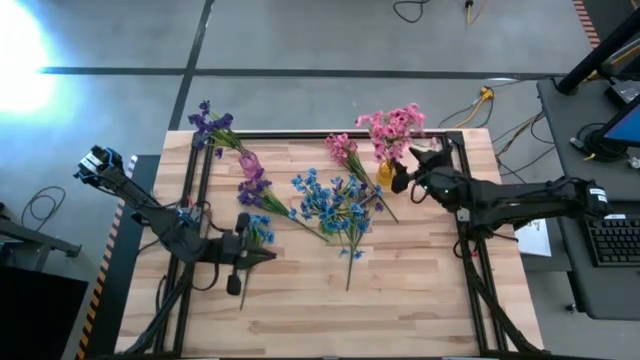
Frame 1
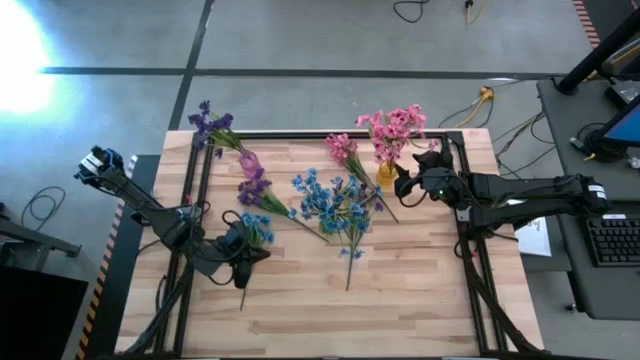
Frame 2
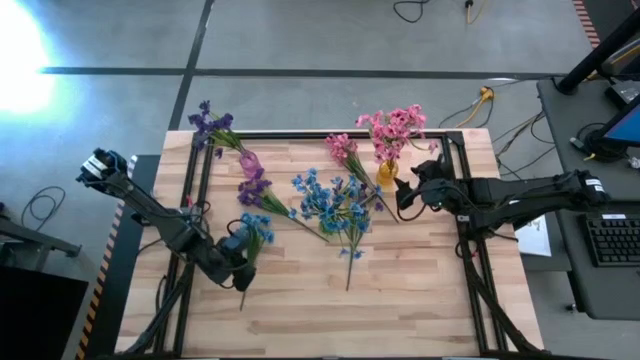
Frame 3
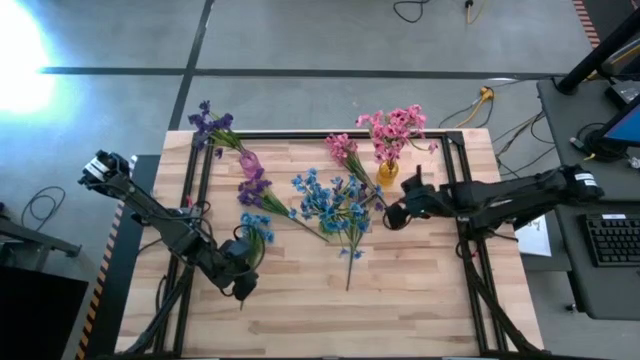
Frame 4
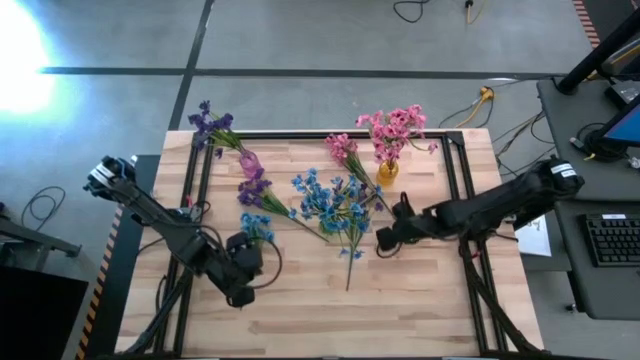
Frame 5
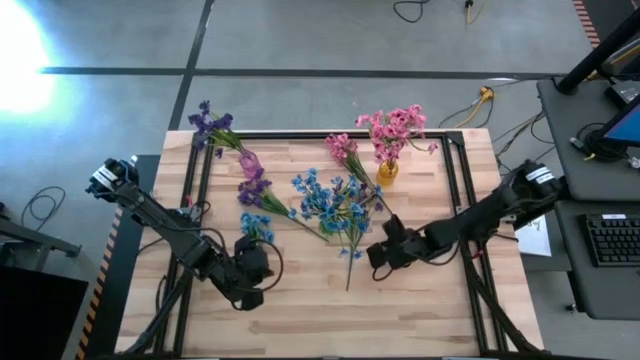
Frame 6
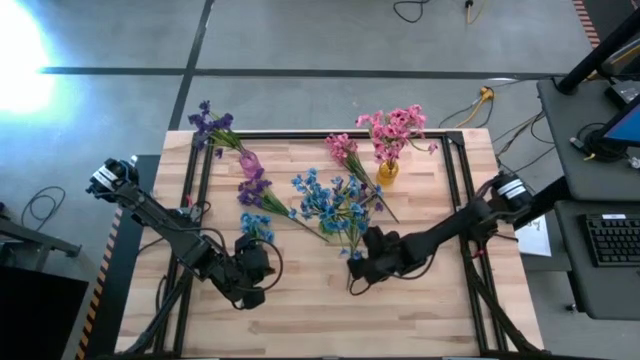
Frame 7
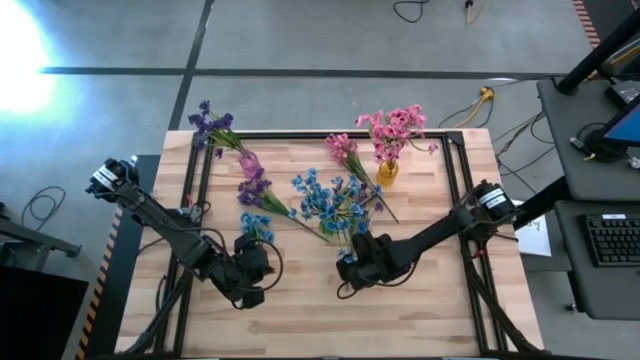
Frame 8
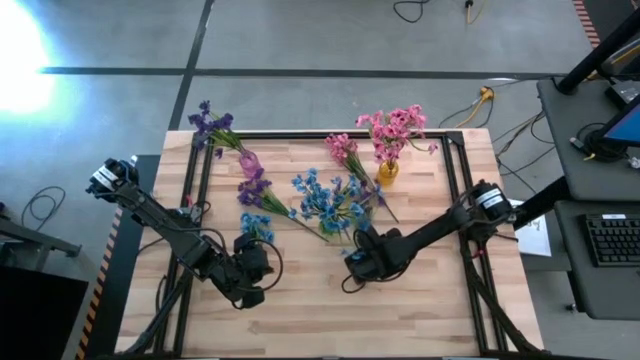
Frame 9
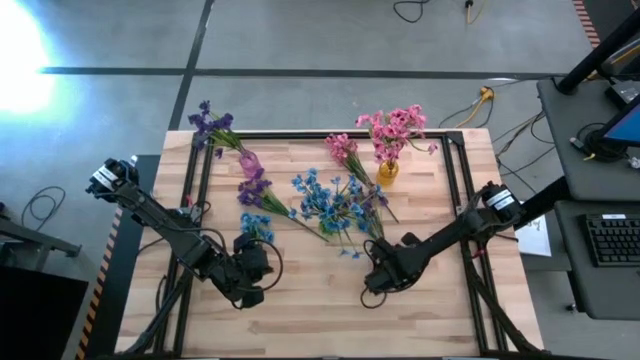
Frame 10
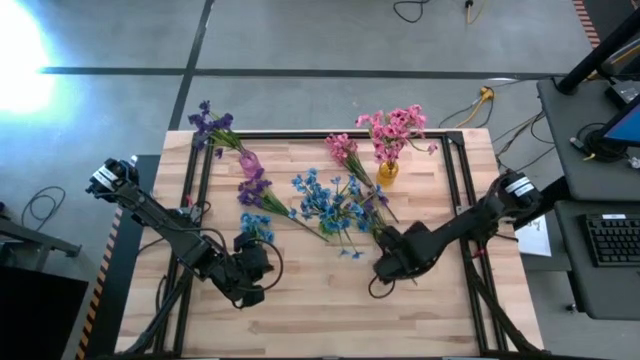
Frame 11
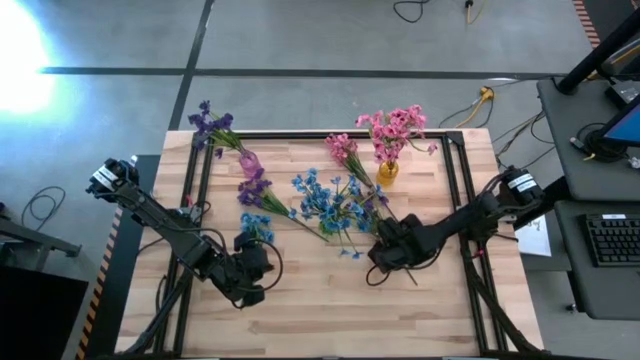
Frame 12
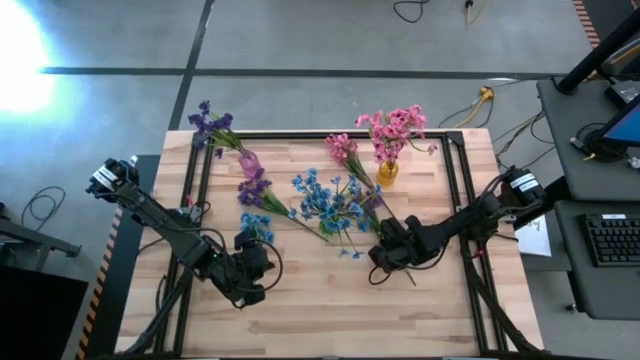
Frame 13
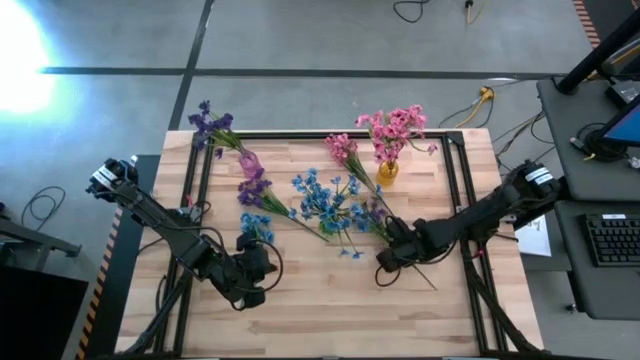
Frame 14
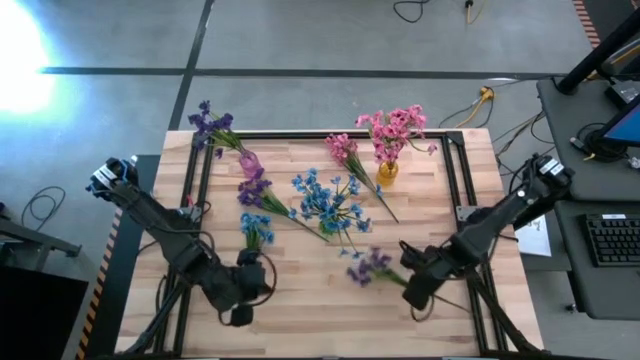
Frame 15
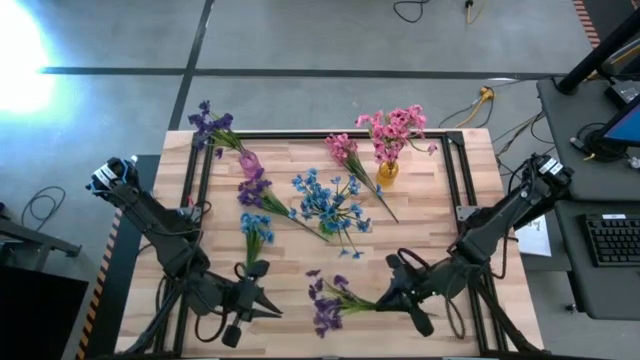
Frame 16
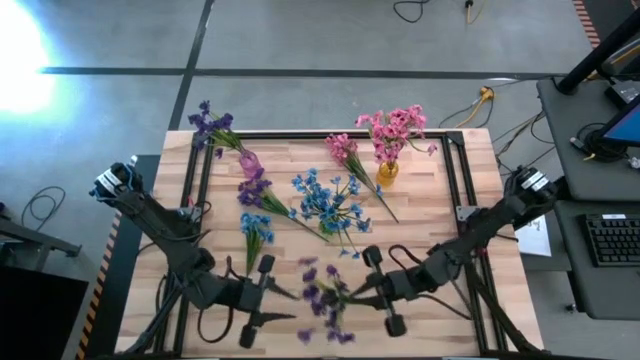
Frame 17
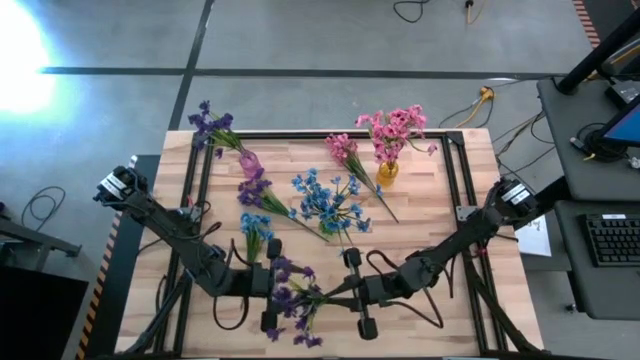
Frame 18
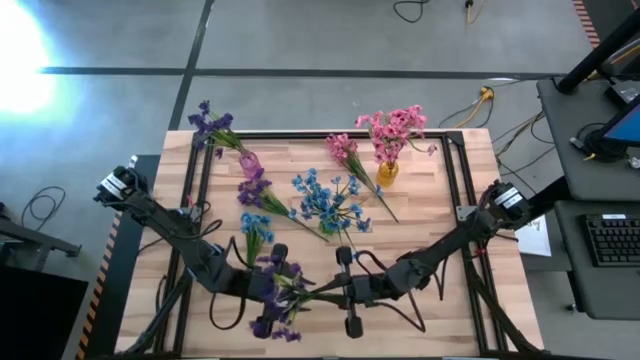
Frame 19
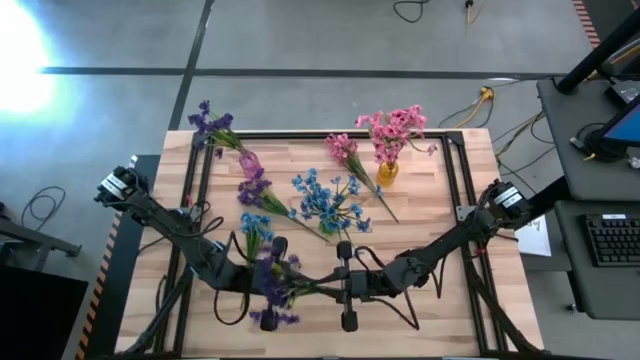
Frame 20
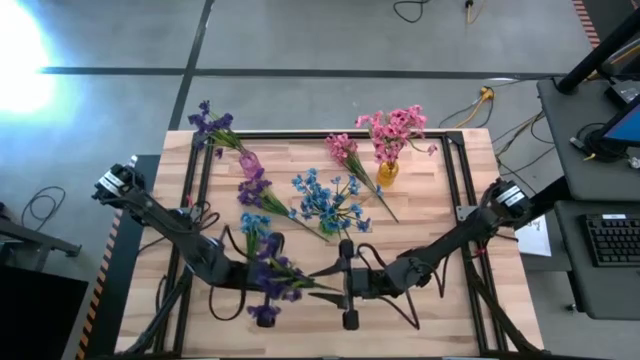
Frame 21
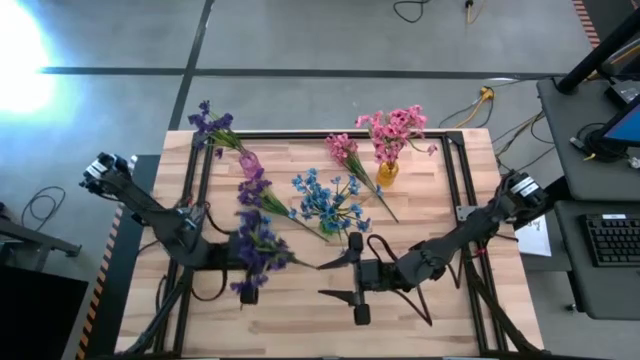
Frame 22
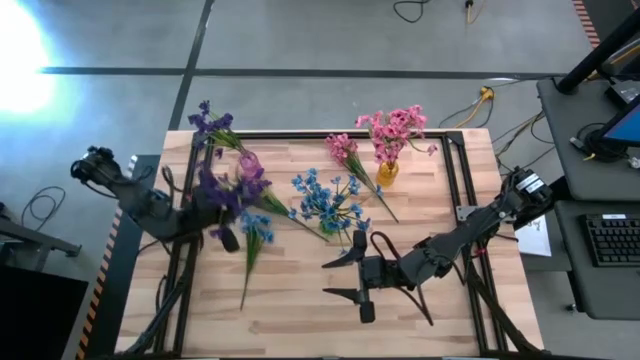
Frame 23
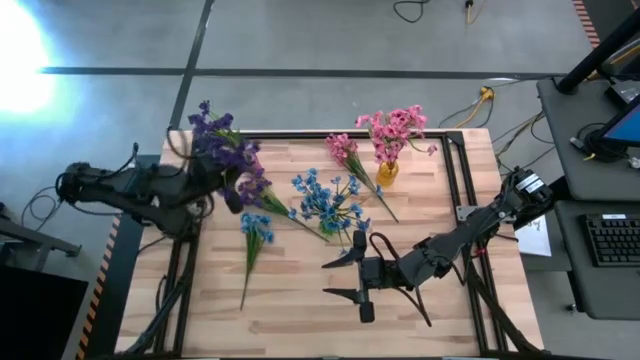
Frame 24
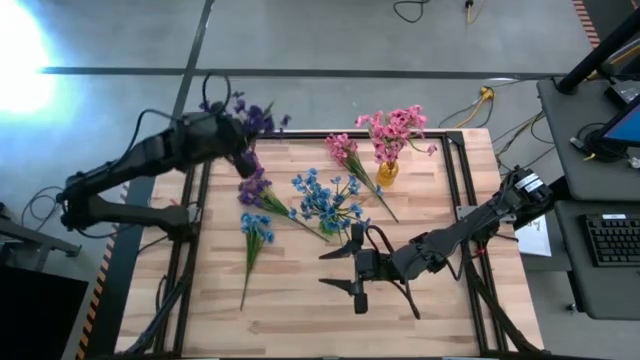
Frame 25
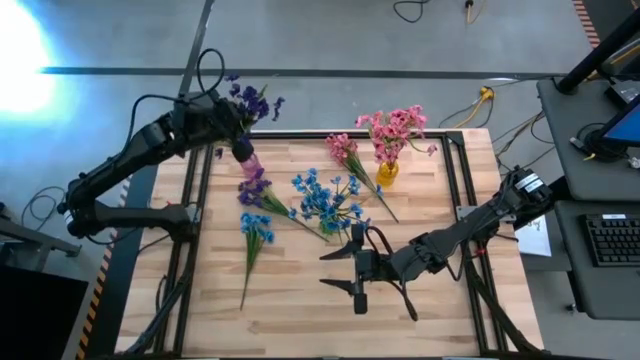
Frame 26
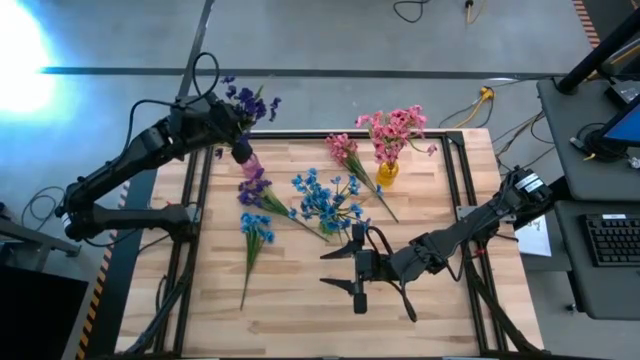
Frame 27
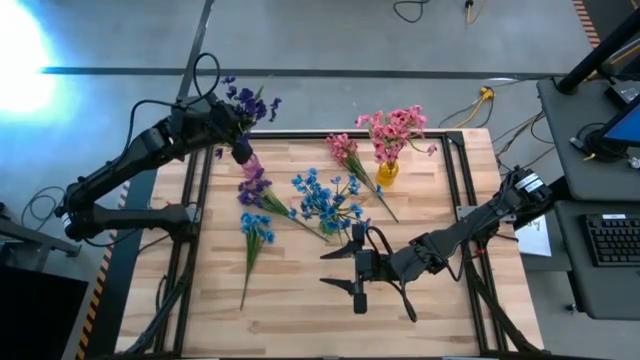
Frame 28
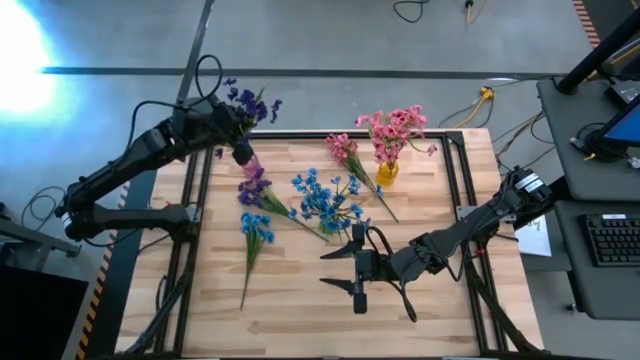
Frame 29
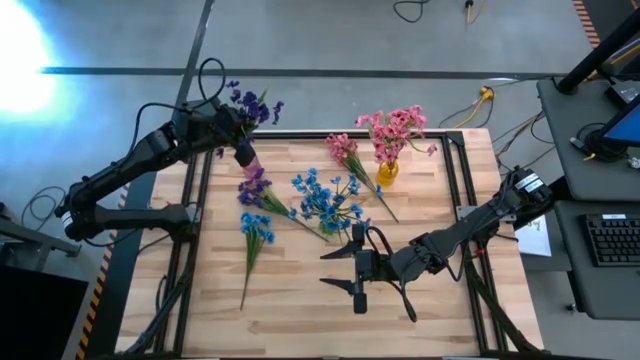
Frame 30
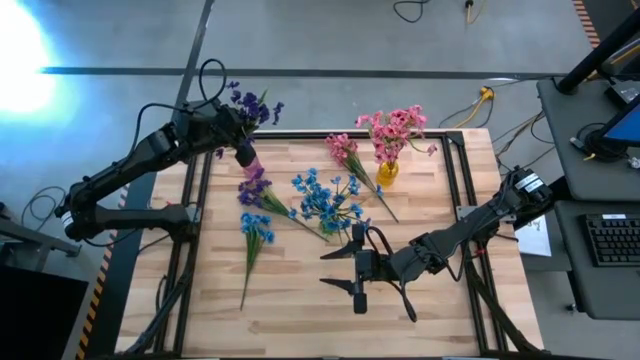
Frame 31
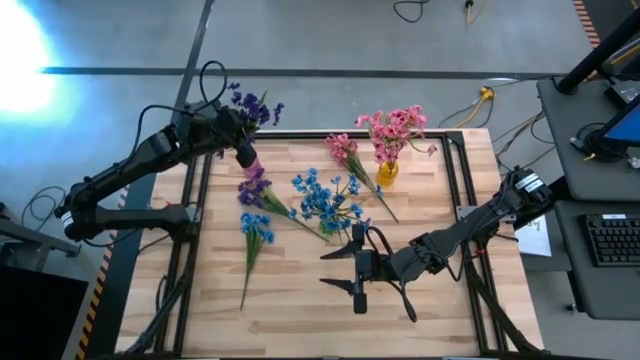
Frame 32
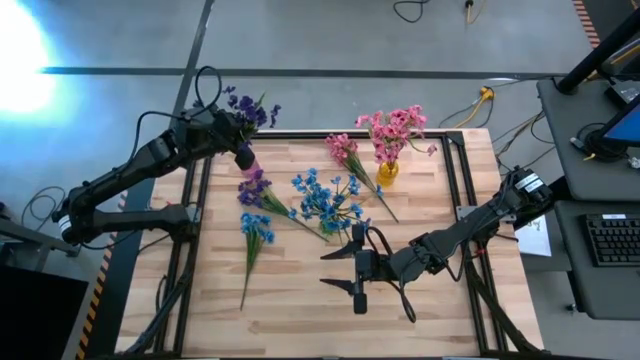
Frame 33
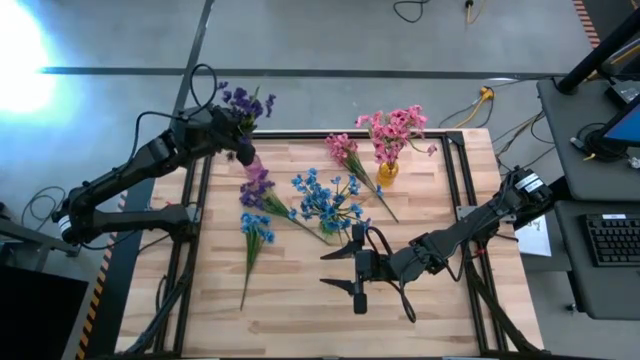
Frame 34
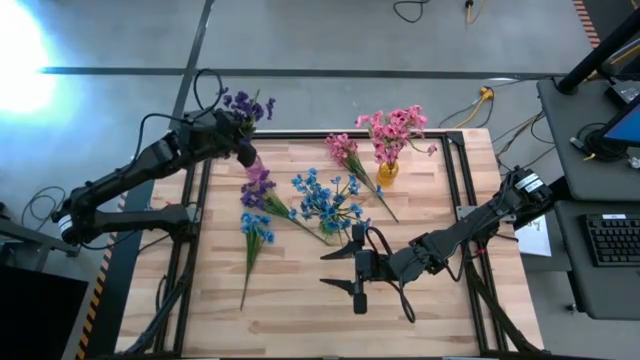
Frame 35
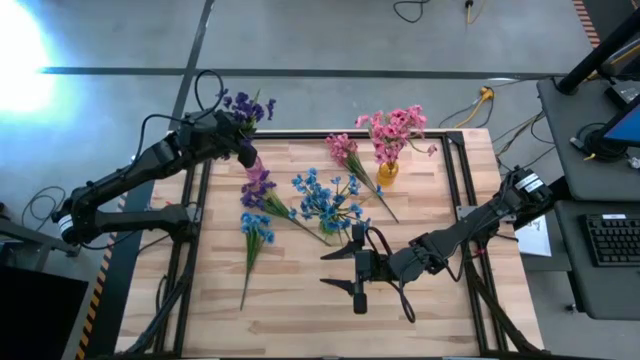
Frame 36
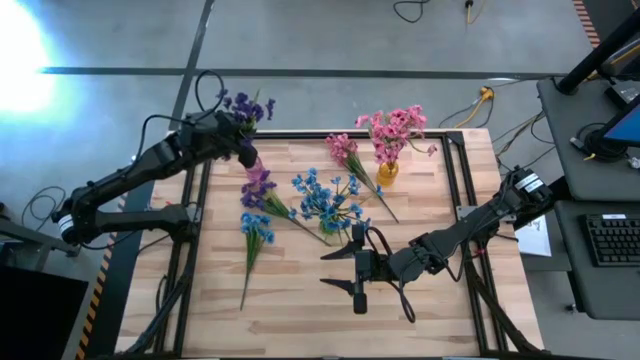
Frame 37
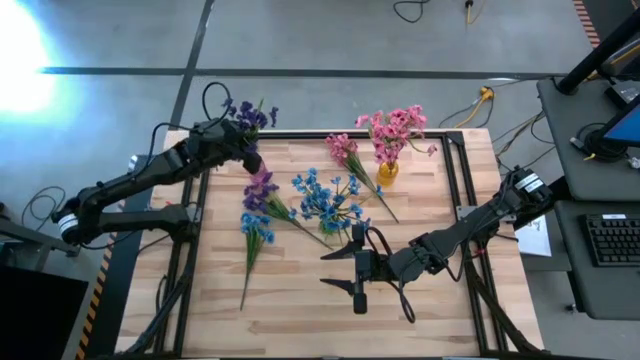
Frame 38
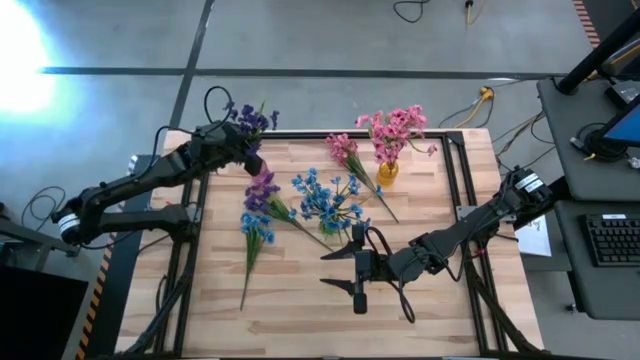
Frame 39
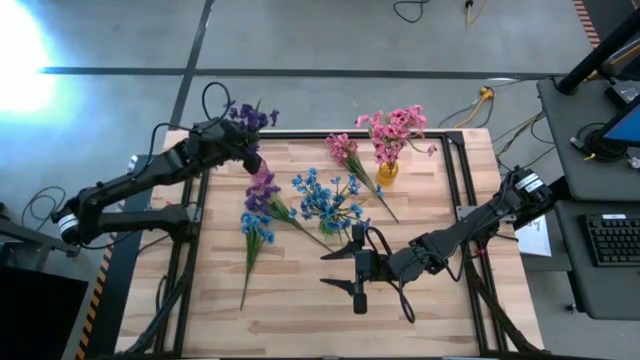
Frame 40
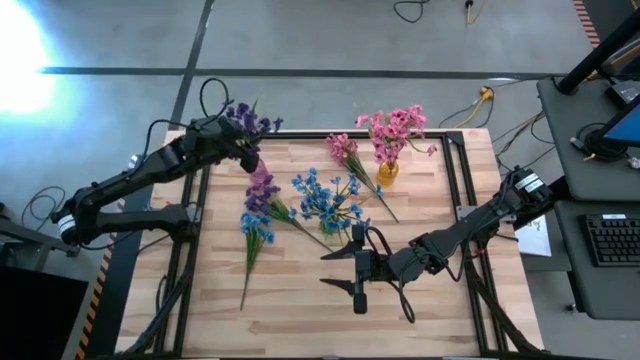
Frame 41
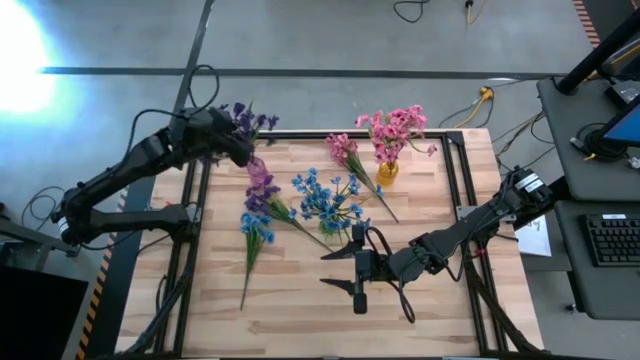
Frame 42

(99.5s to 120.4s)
Task: Sort flowers into vase by color
Put the right violet flowers into the violet vase
